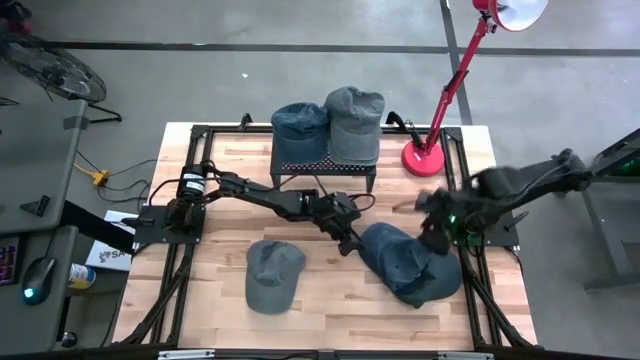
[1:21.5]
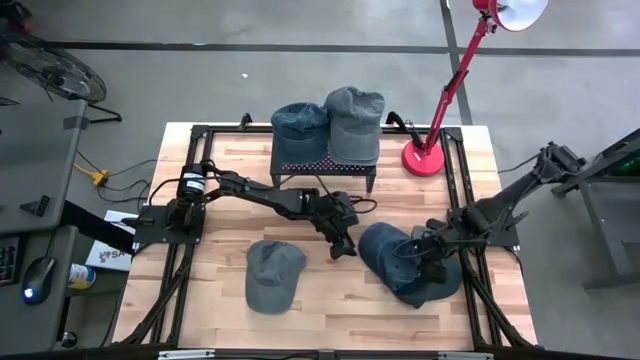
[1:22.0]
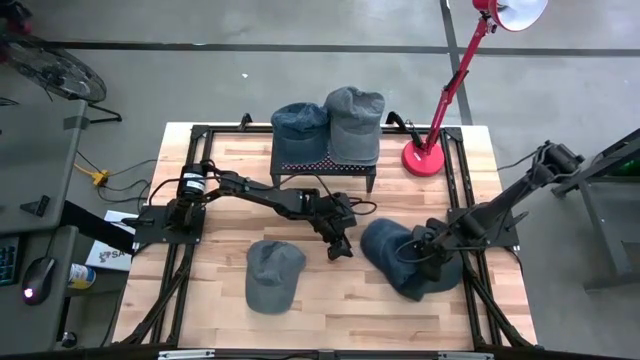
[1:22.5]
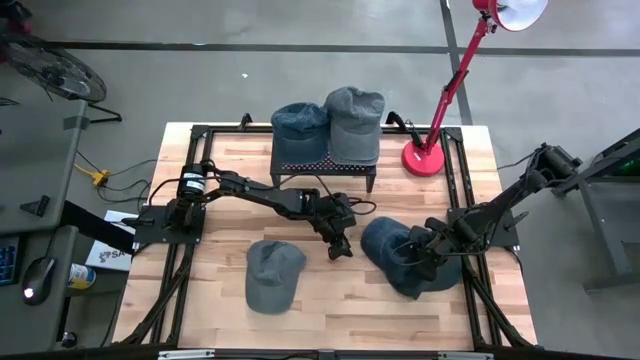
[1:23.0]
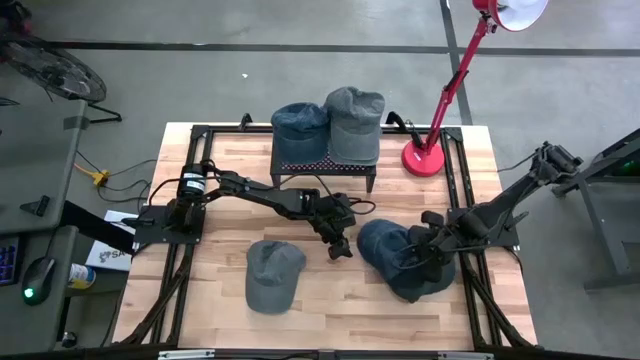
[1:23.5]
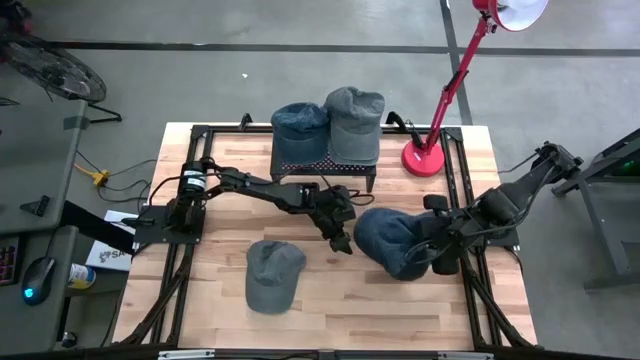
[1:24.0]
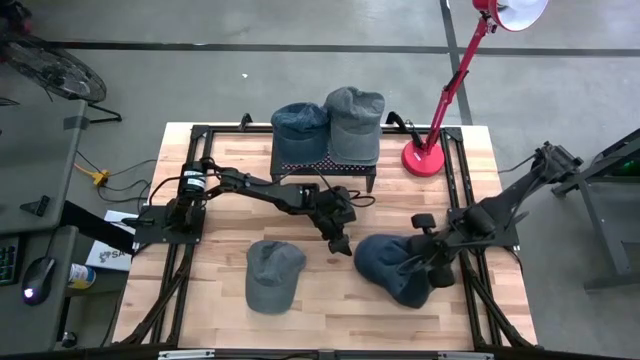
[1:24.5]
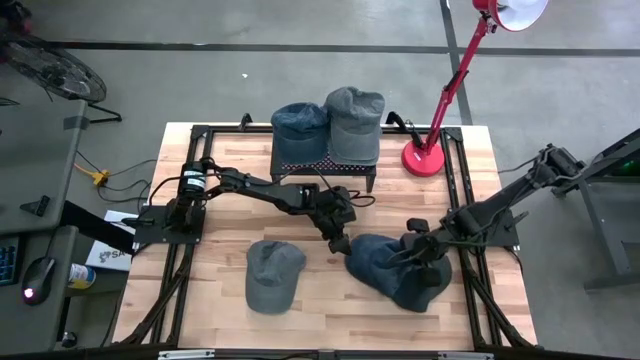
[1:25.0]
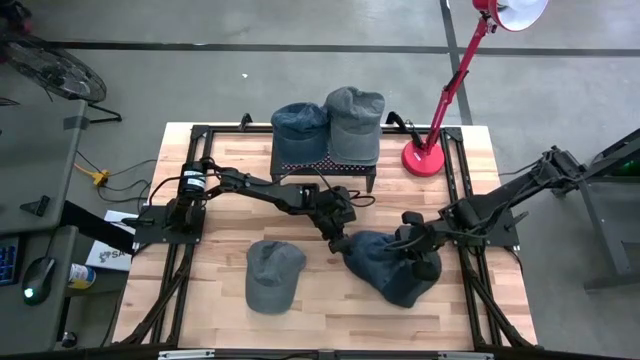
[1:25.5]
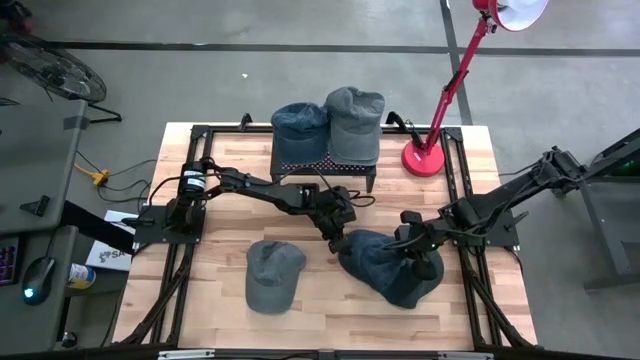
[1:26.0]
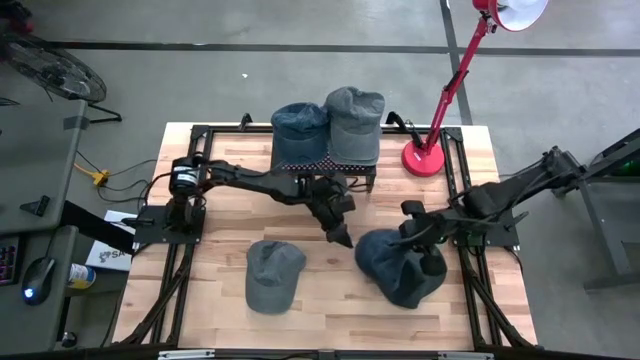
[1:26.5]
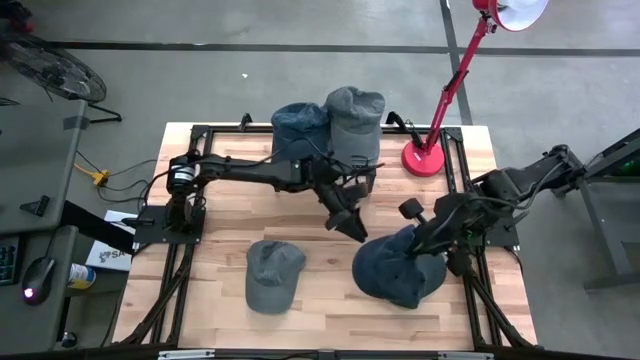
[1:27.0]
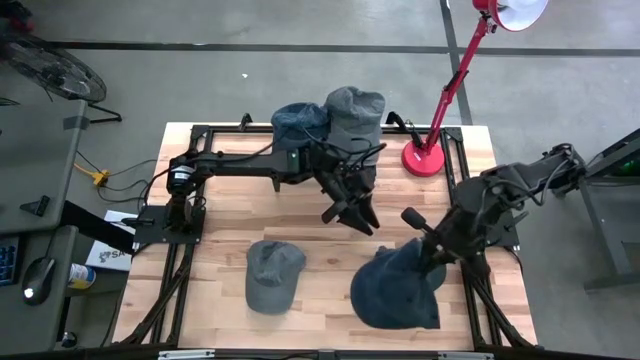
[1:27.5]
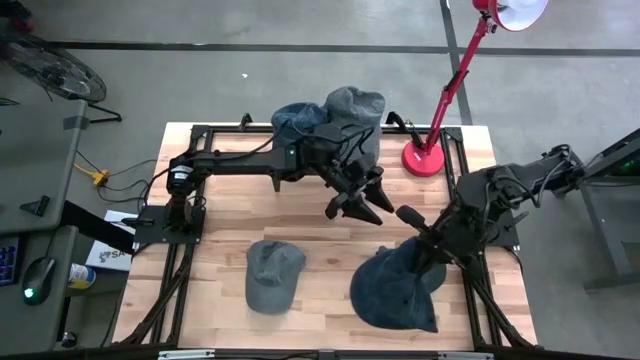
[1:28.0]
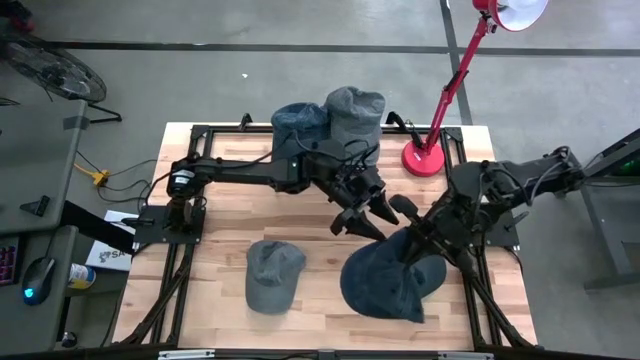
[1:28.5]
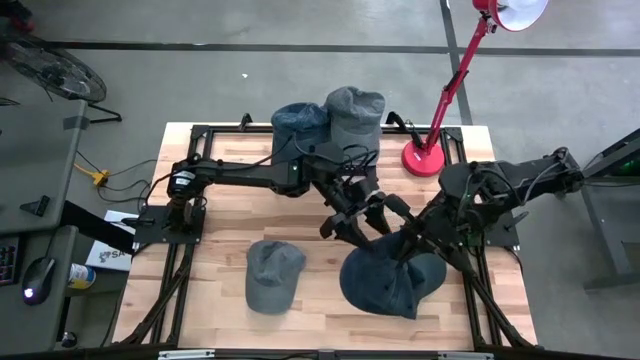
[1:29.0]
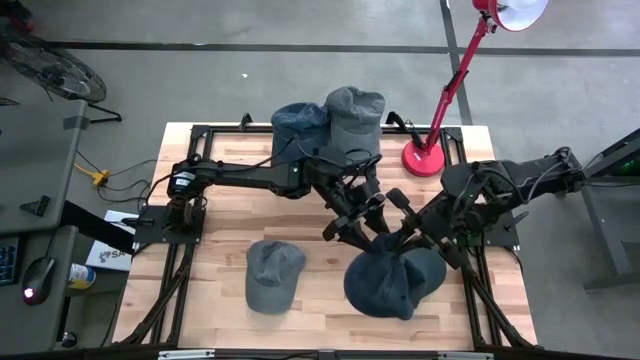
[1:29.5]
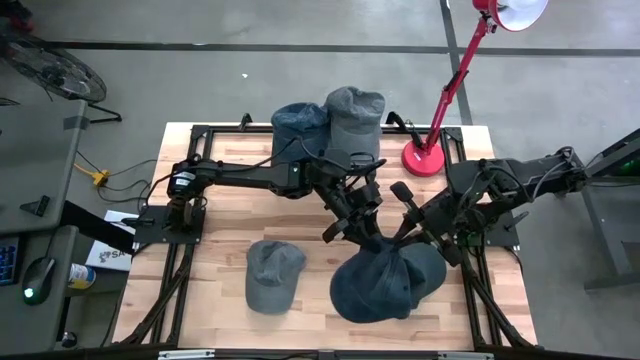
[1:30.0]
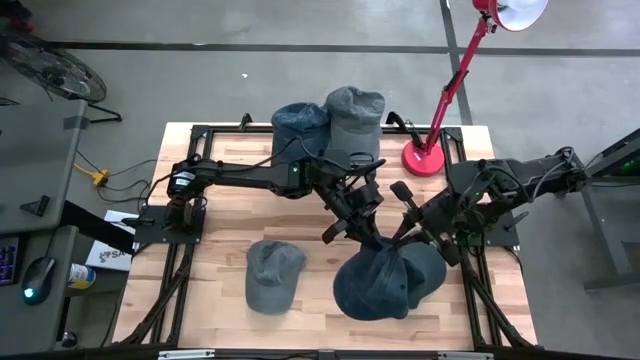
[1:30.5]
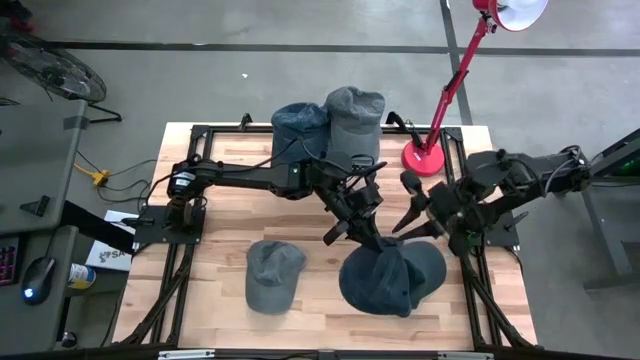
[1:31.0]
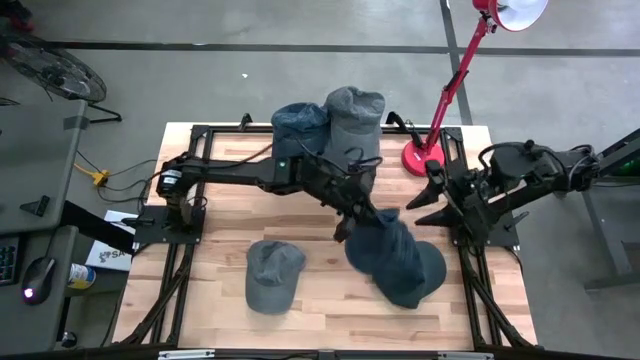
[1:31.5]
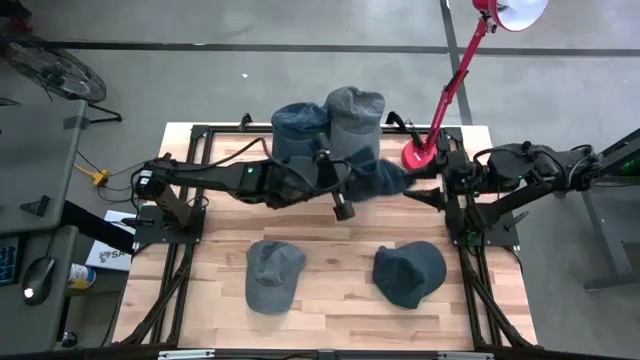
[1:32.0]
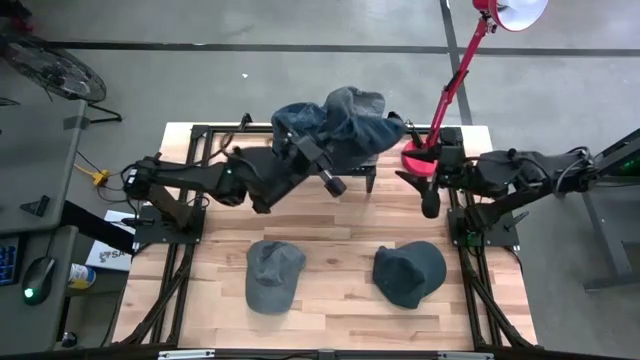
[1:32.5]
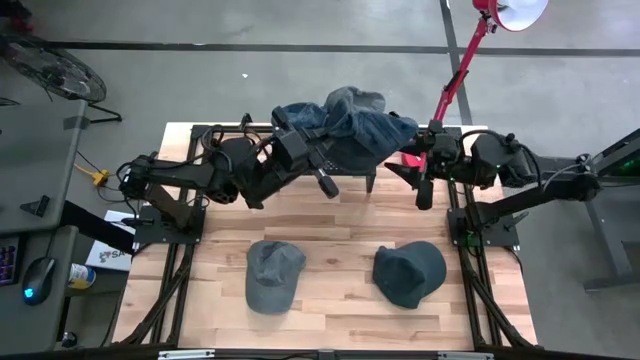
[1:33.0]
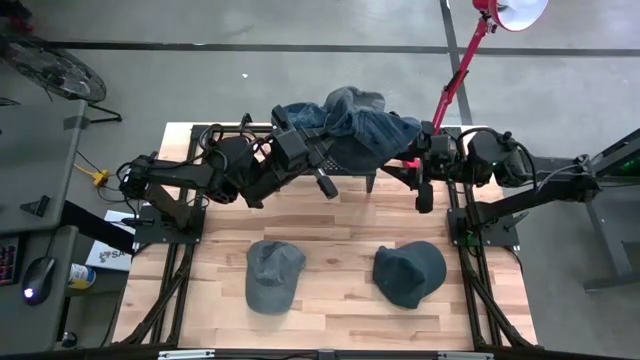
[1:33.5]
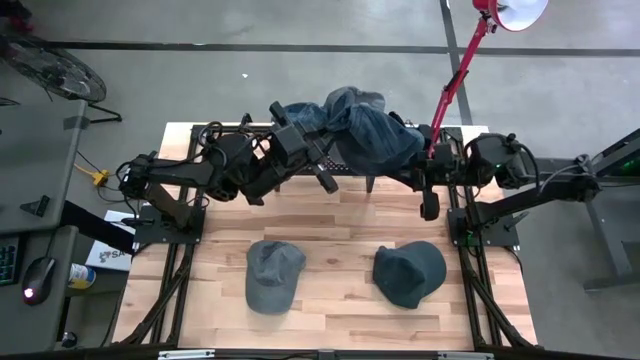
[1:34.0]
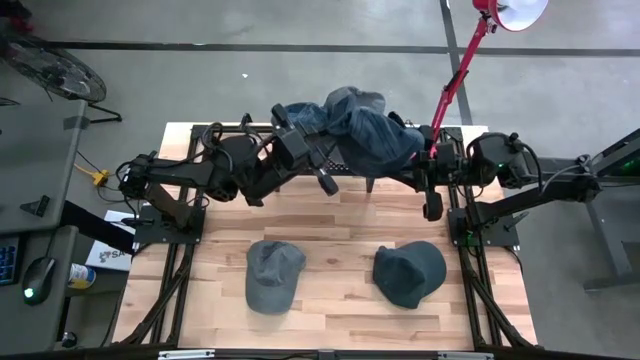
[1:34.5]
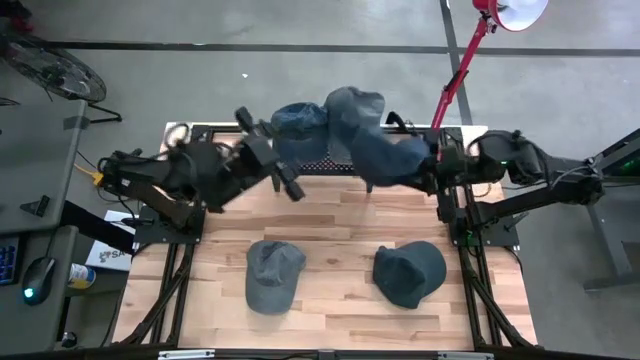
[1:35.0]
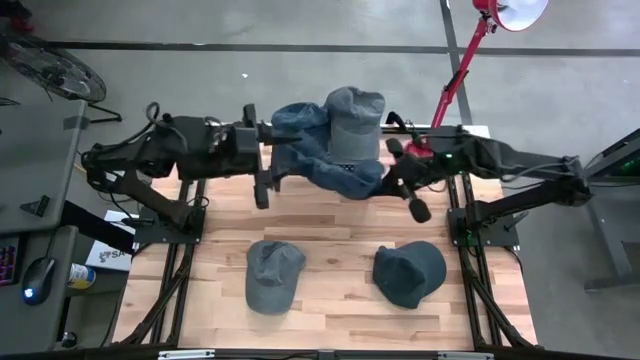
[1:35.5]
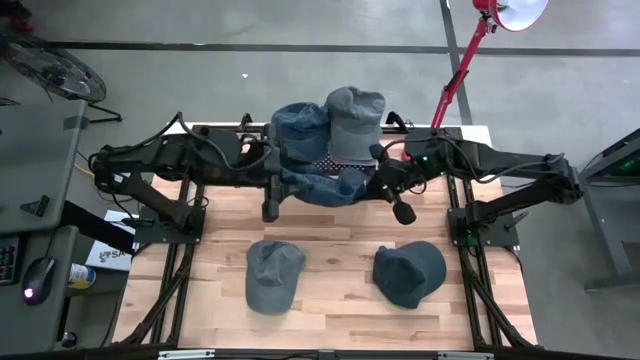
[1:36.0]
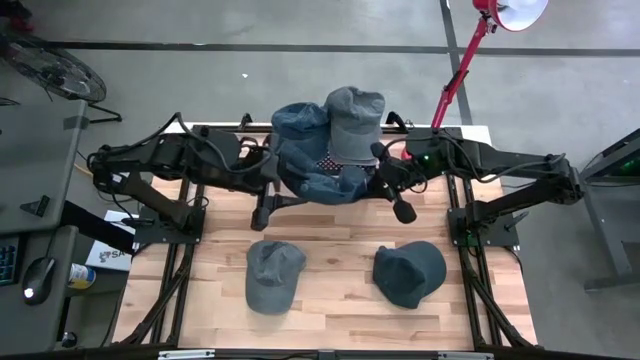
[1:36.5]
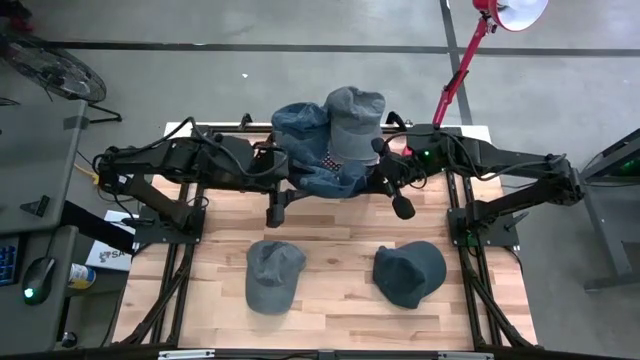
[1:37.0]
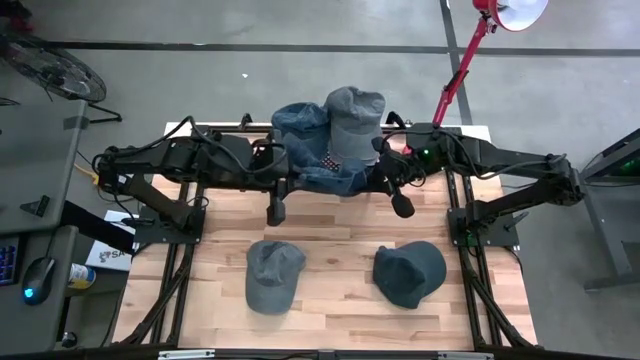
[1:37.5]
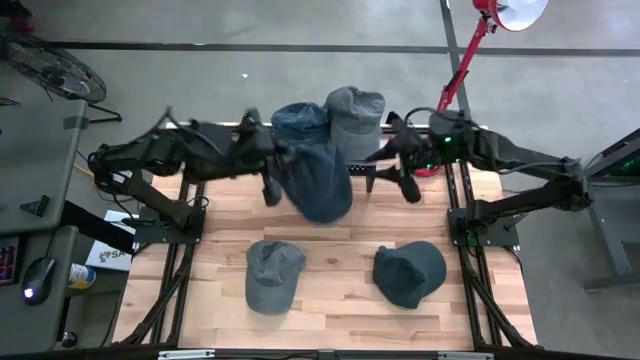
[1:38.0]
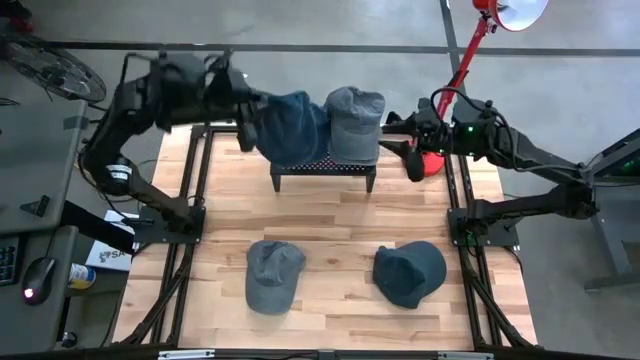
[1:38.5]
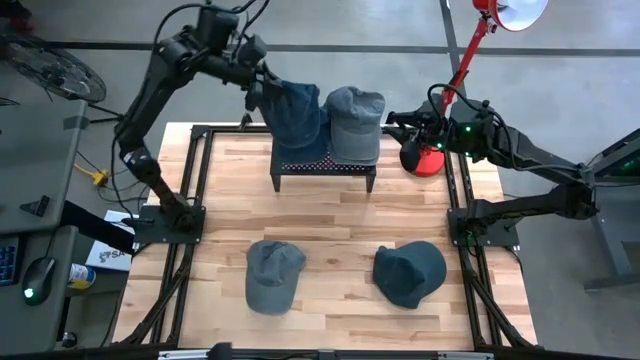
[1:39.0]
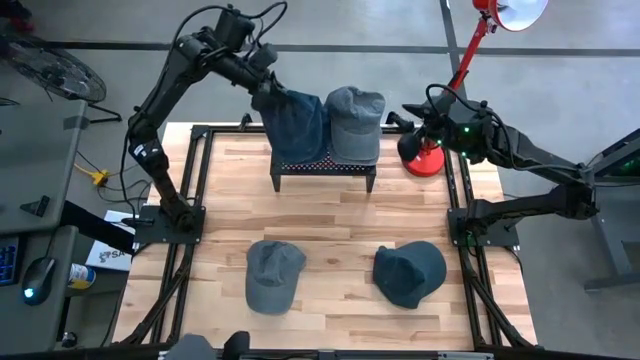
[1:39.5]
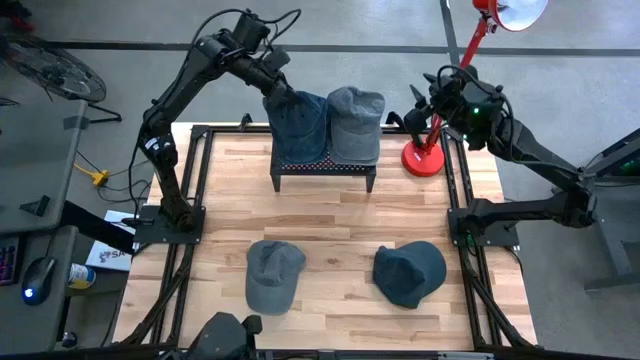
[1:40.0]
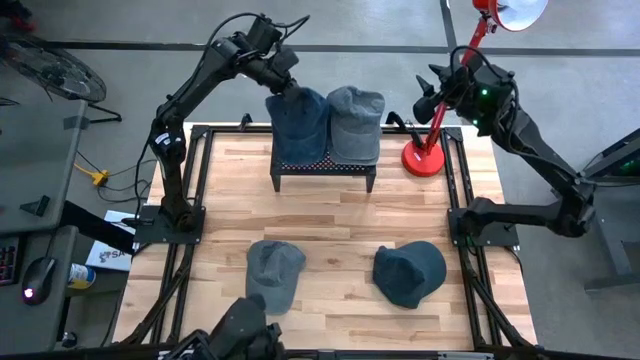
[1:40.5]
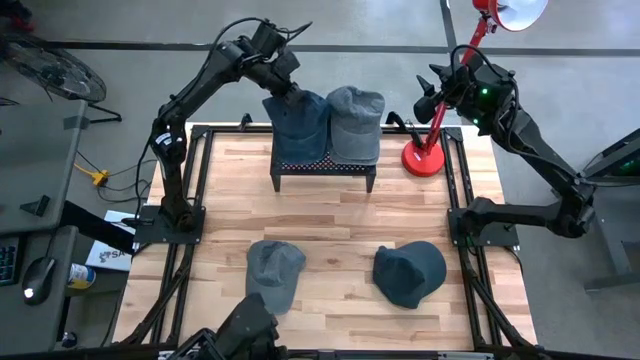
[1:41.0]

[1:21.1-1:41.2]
Task: Pick & Place hat
Stack the top blue cap on the blue cap on the shelf
